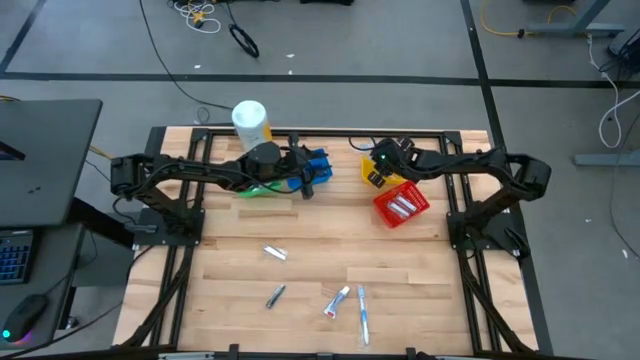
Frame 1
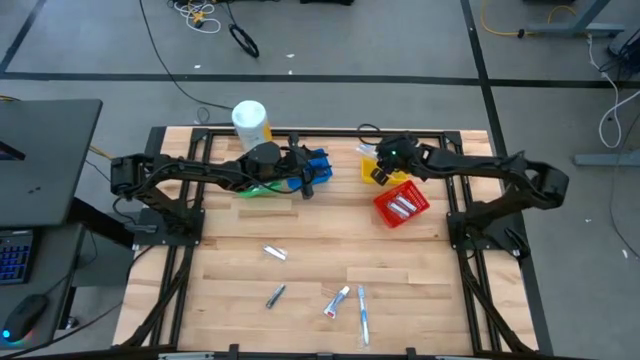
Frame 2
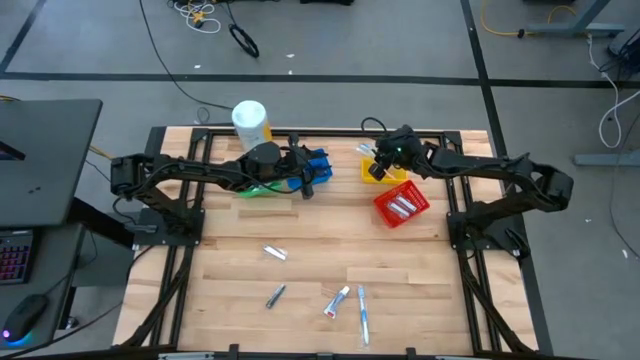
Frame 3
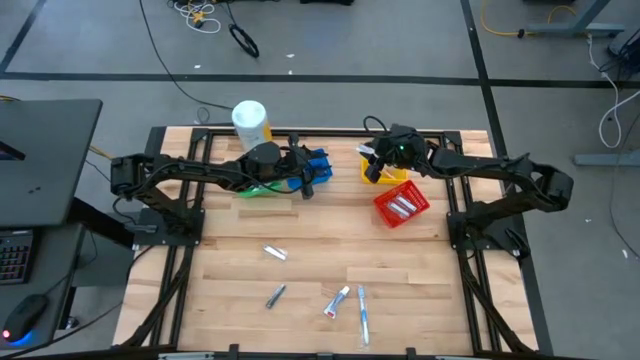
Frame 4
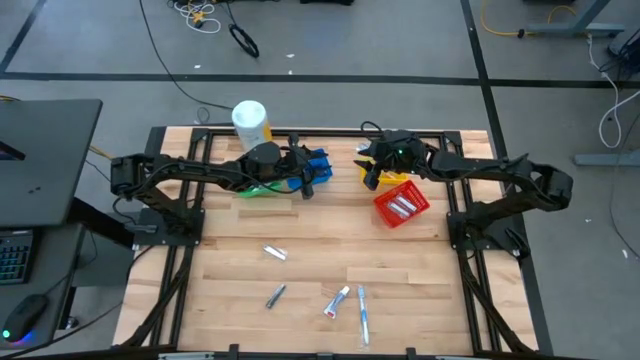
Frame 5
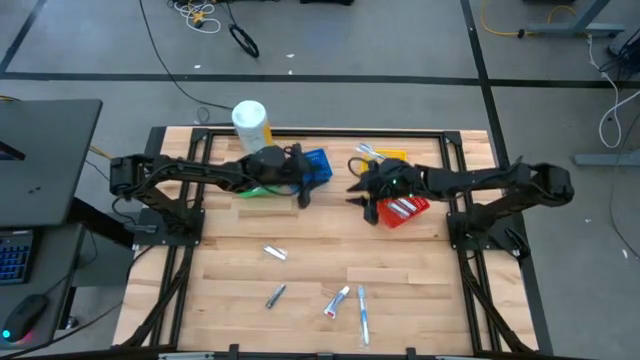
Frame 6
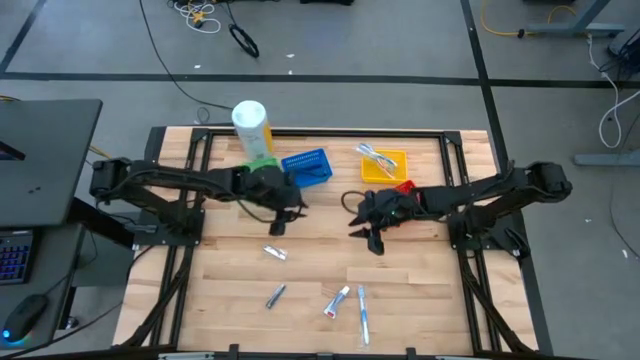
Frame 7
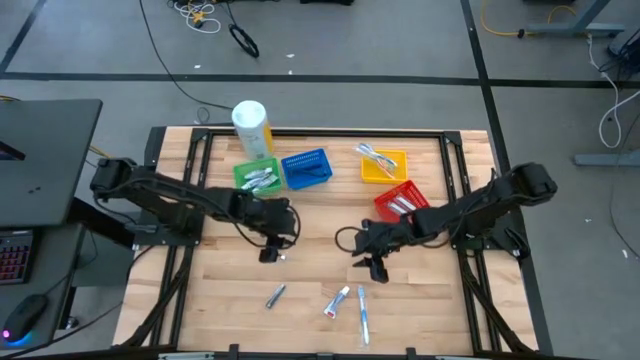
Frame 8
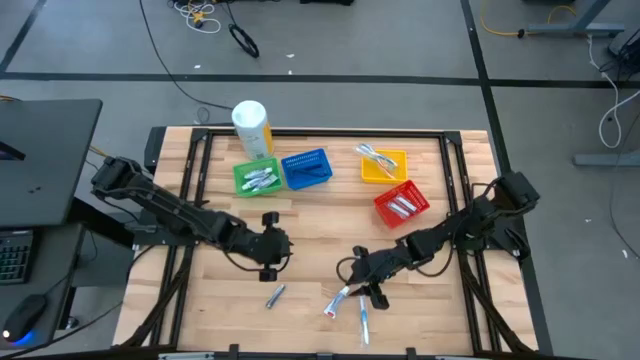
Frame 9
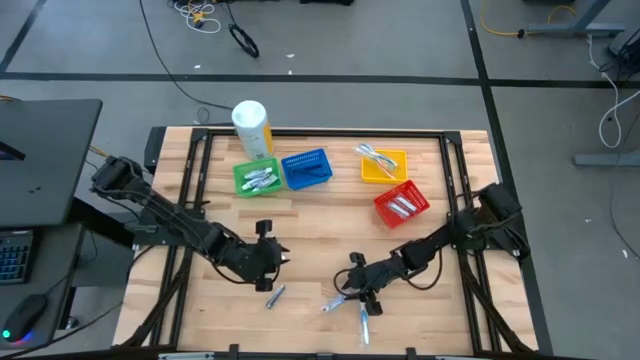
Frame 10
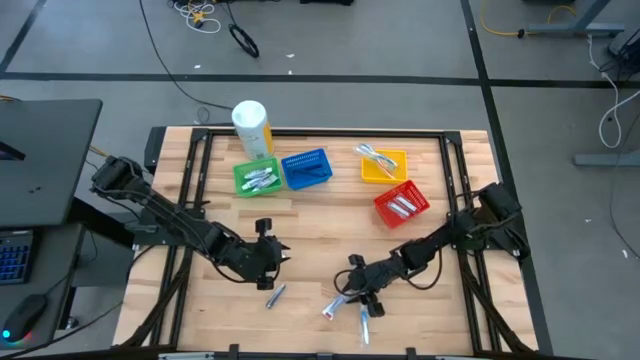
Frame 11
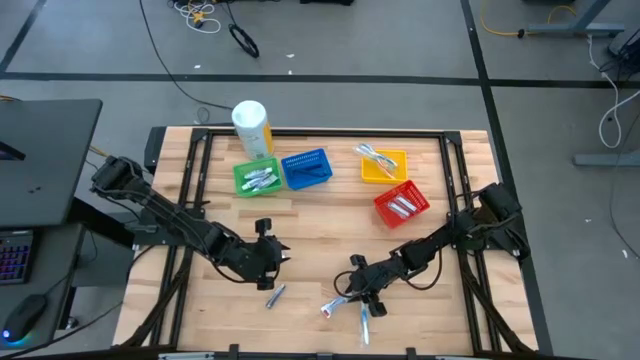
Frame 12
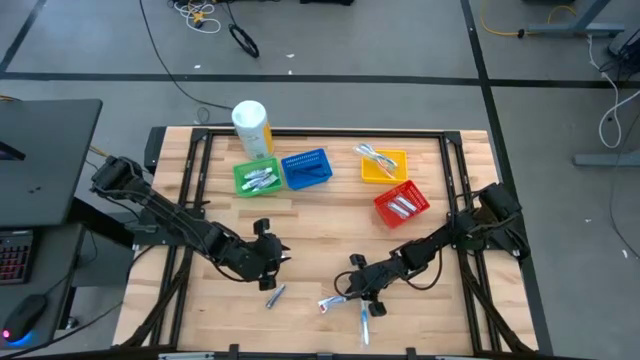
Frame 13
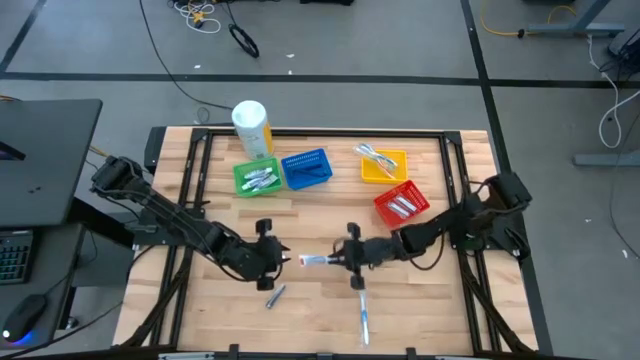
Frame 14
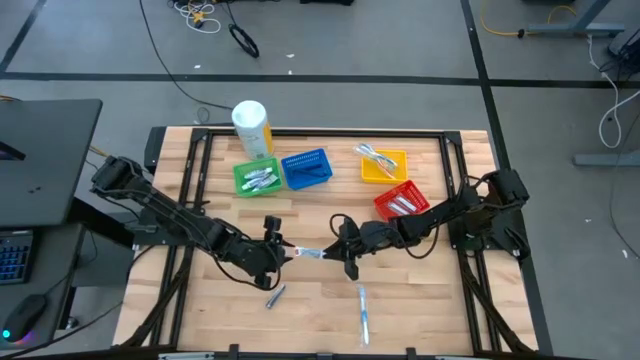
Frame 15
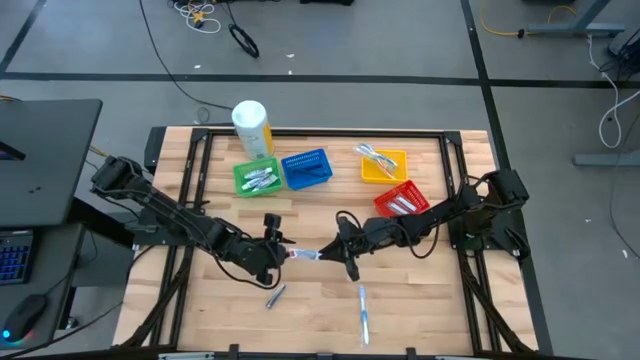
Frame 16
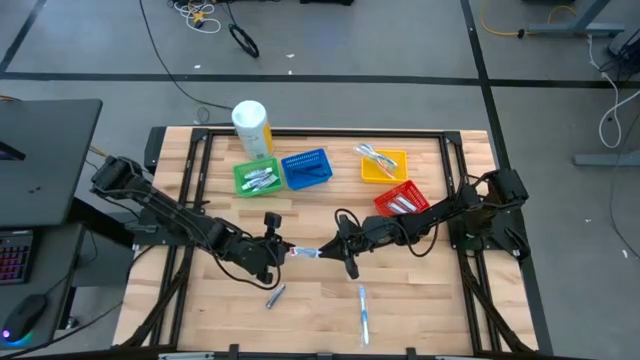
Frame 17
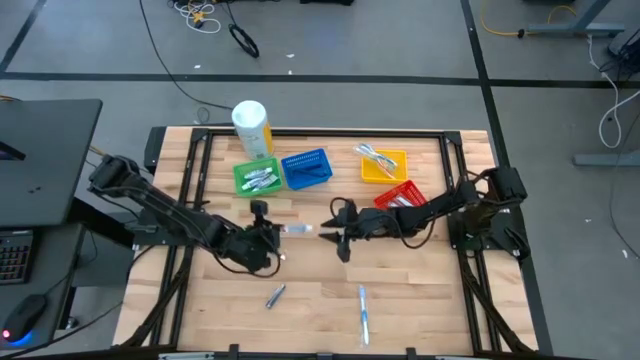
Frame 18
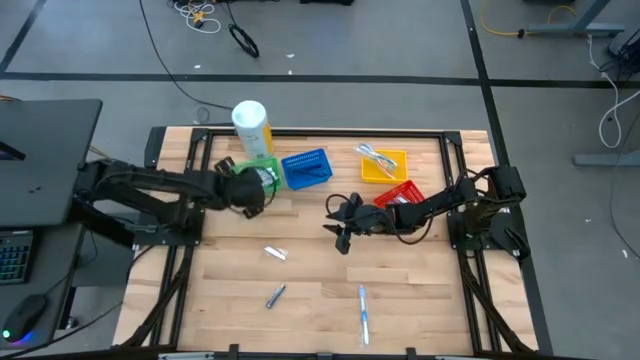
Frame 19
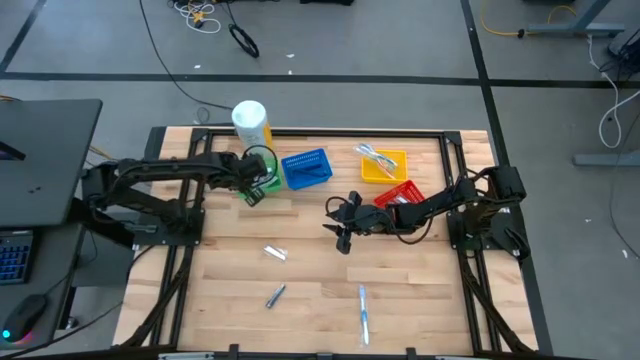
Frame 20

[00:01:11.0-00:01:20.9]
Task: Pick & Place Travel size toiletries
Put the white toothpaste into the green bin

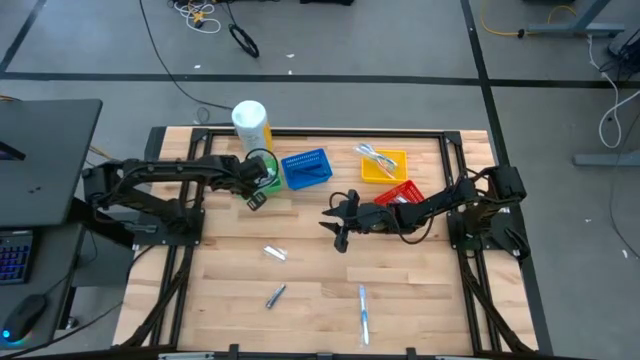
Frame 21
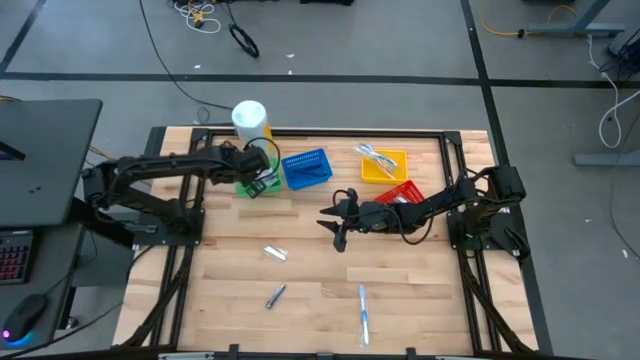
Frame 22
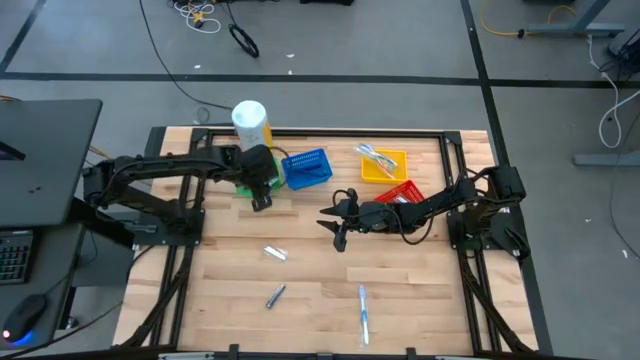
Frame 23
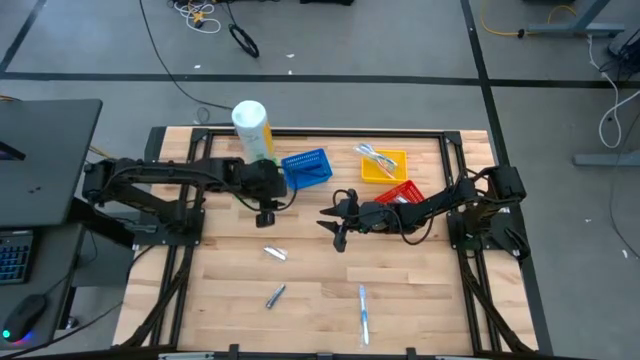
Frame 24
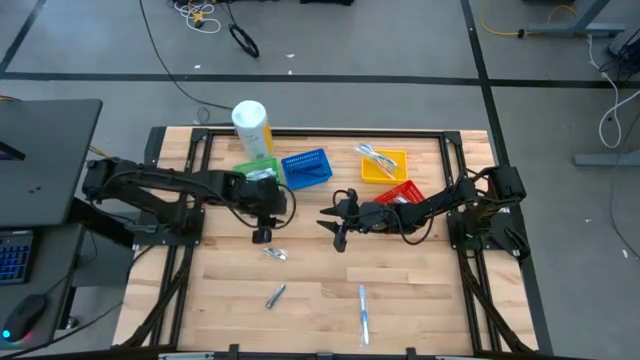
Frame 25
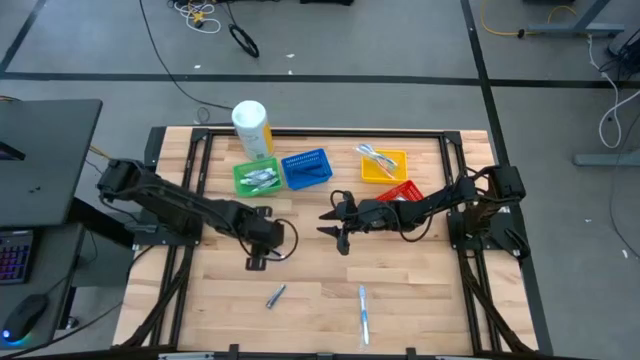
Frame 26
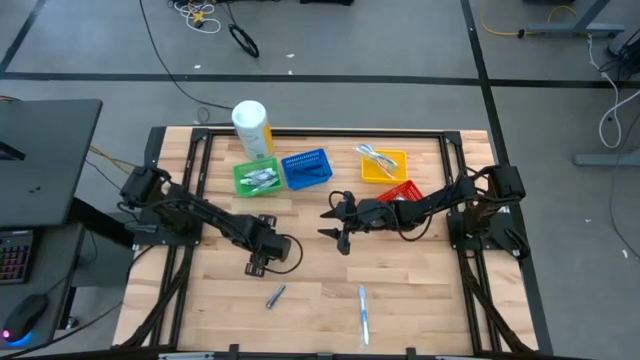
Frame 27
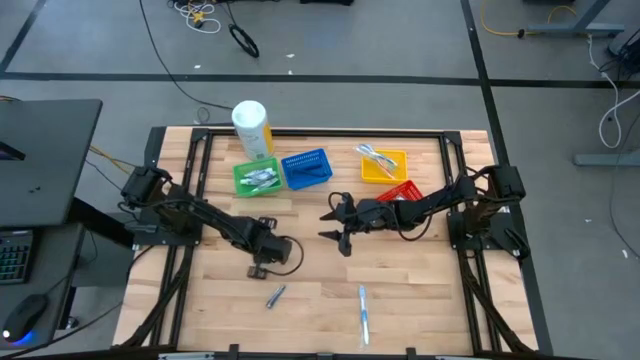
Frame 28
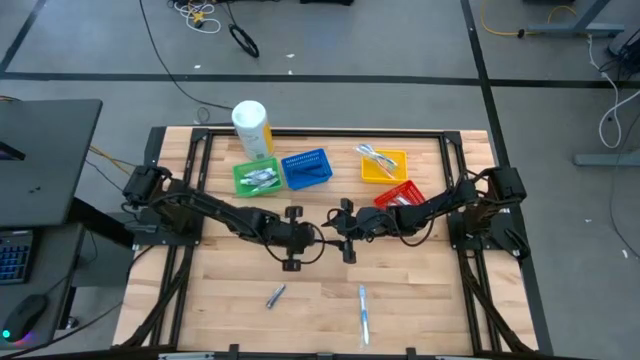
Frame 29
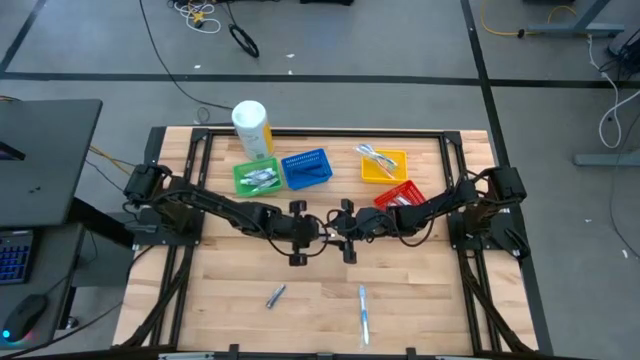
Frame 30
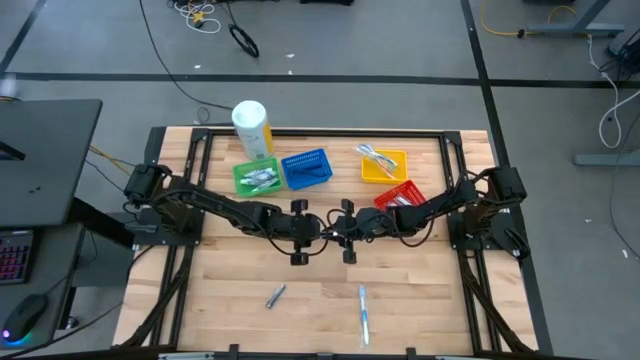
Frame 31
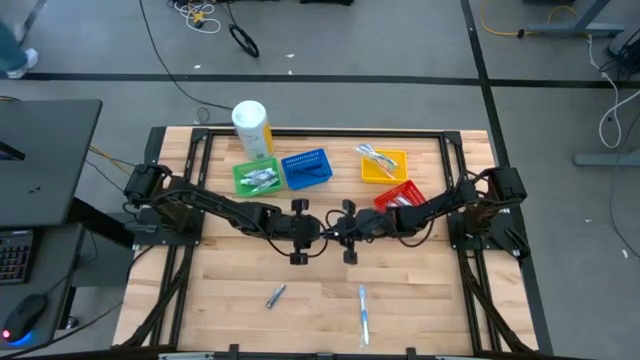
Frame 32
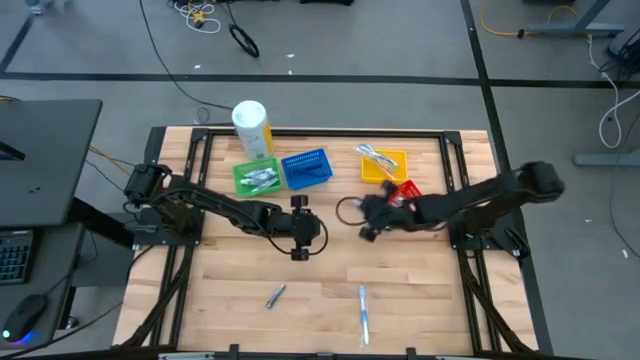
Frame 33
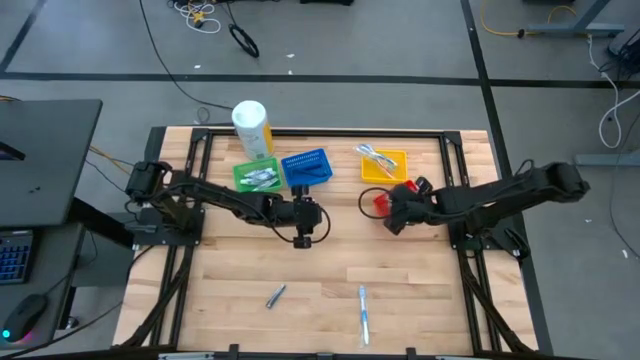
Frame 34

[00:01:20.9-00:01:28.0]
Put the silver nail cutter into the red bin

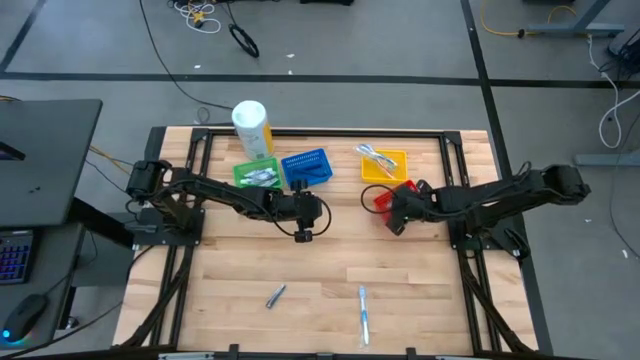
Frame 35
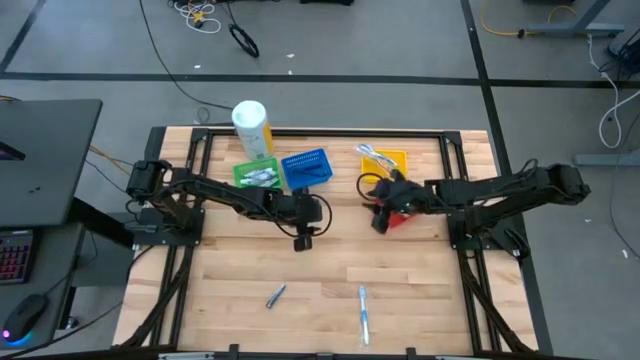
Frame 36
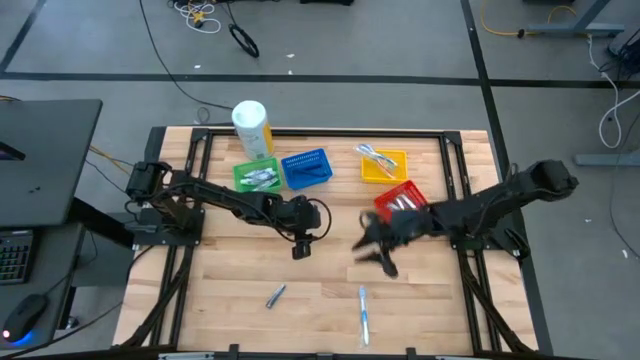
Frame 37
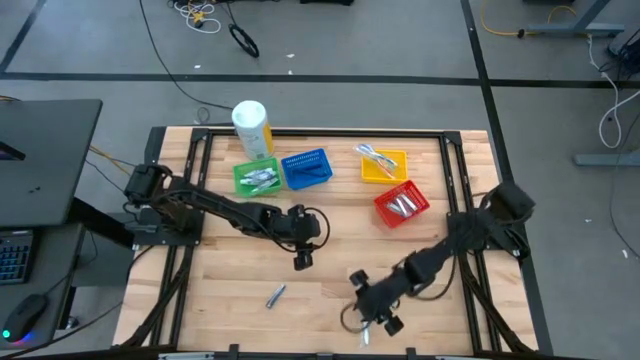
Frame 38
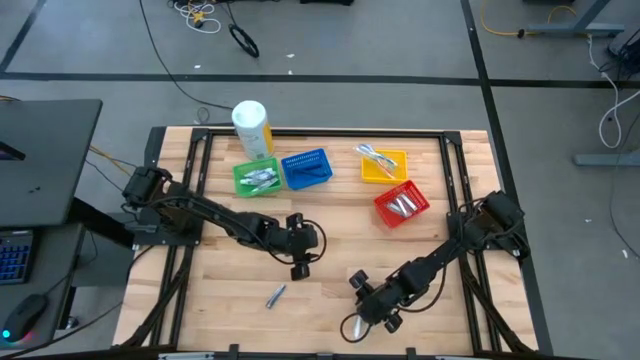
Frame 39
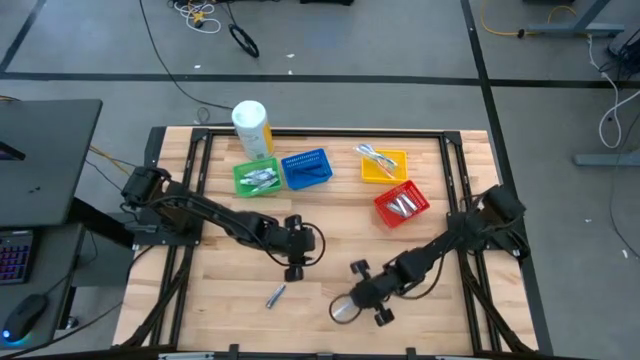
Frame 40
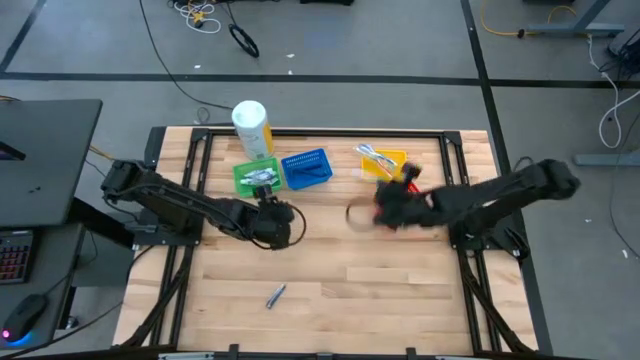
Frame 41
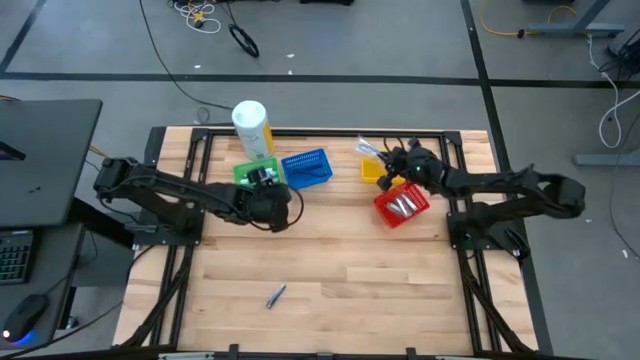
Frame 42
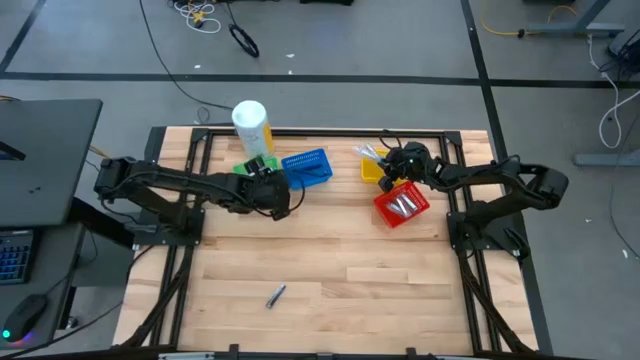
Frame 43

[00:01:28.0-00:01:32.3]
Put the blue toothbrush into the yellow bin
